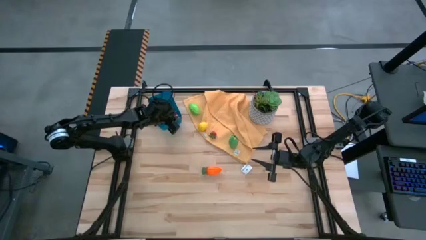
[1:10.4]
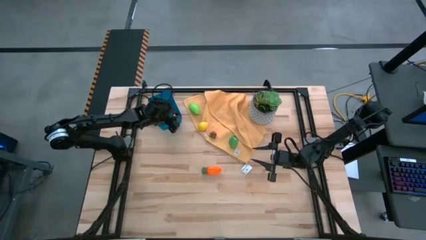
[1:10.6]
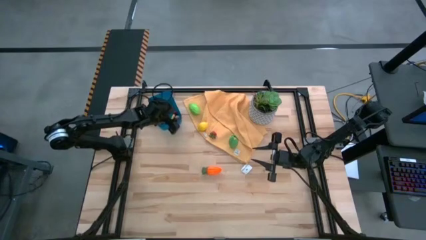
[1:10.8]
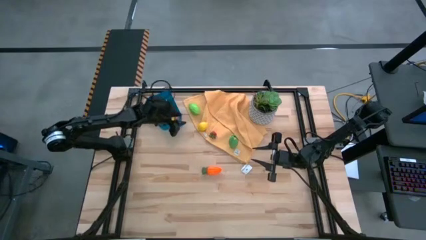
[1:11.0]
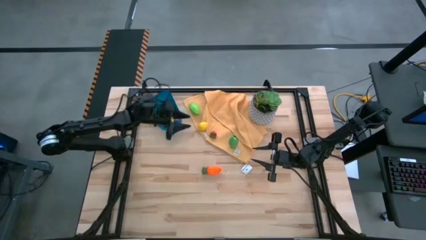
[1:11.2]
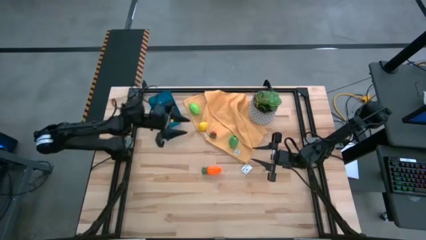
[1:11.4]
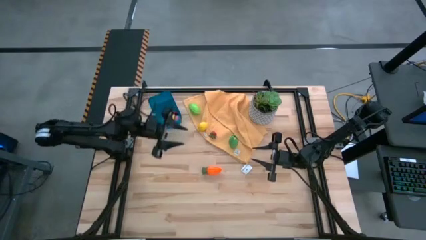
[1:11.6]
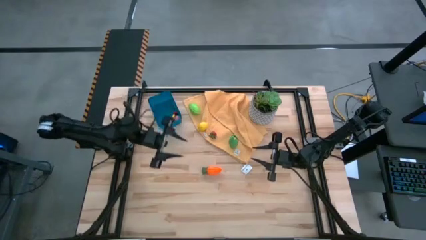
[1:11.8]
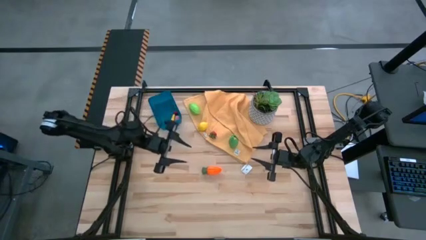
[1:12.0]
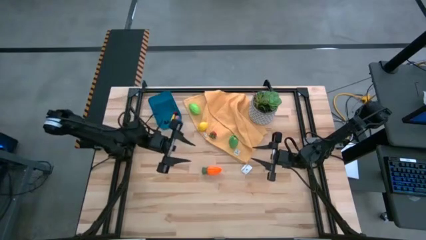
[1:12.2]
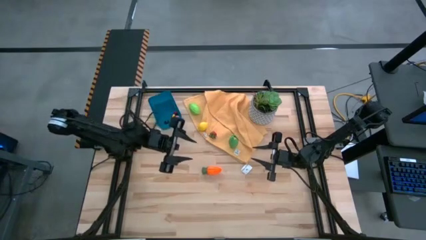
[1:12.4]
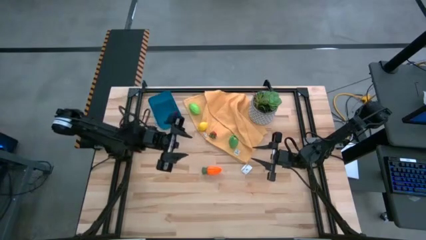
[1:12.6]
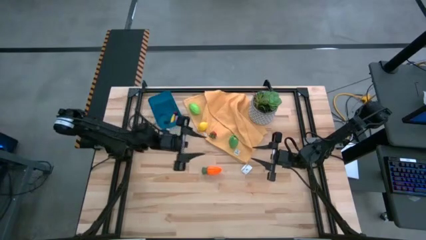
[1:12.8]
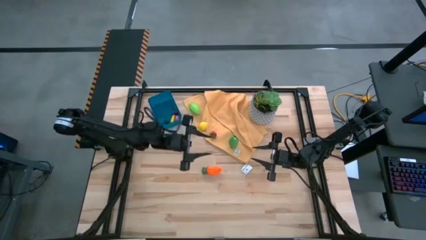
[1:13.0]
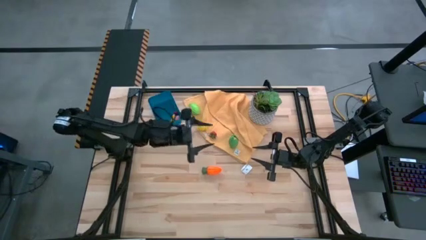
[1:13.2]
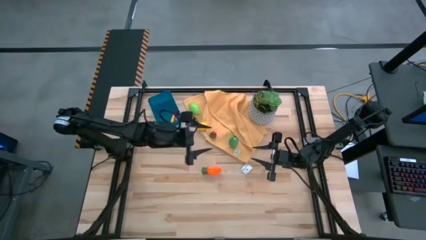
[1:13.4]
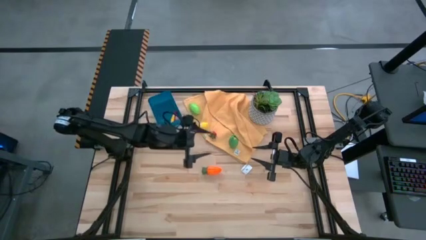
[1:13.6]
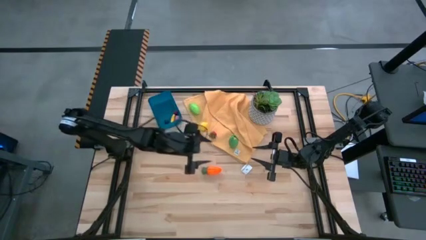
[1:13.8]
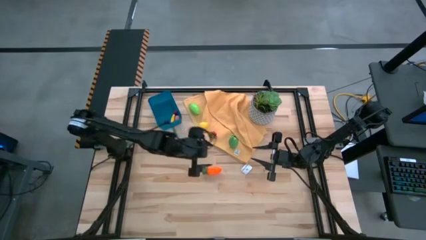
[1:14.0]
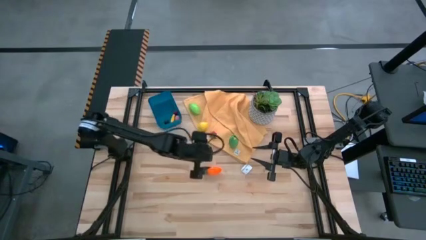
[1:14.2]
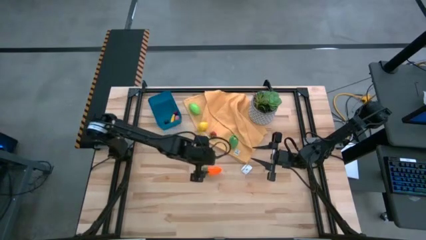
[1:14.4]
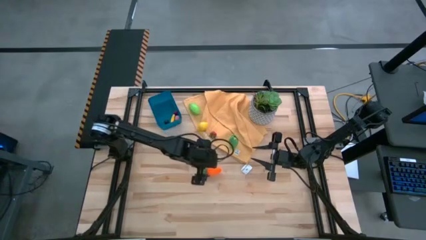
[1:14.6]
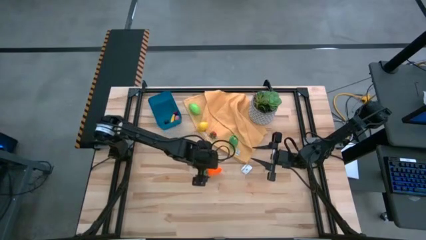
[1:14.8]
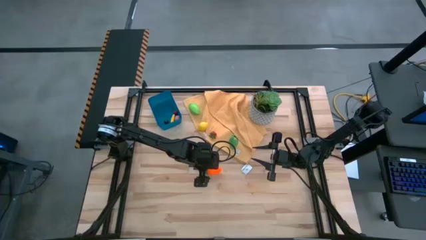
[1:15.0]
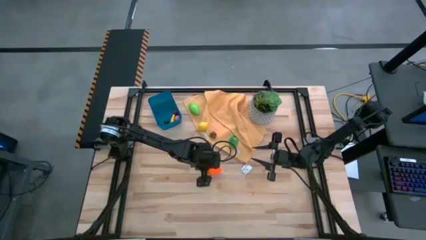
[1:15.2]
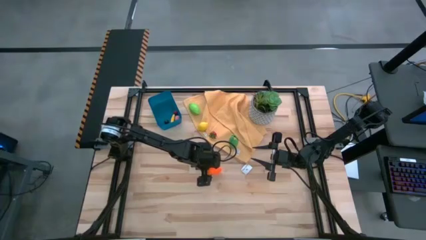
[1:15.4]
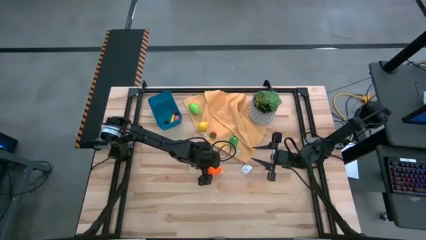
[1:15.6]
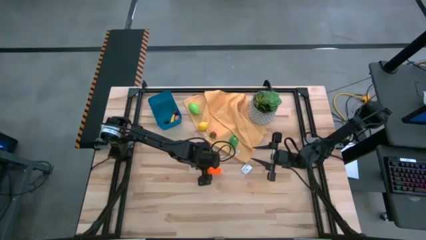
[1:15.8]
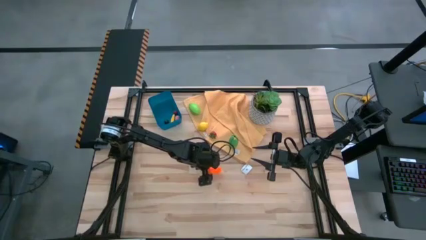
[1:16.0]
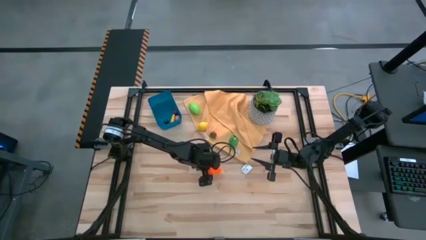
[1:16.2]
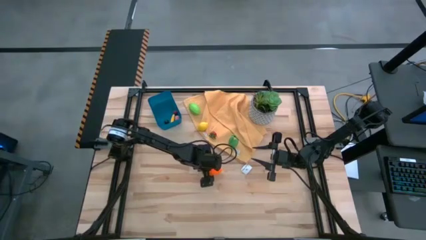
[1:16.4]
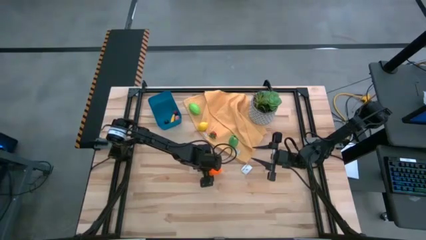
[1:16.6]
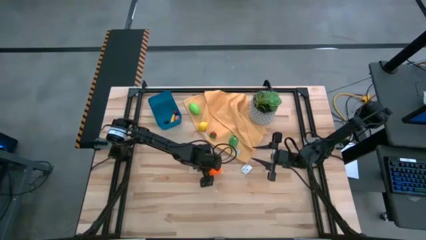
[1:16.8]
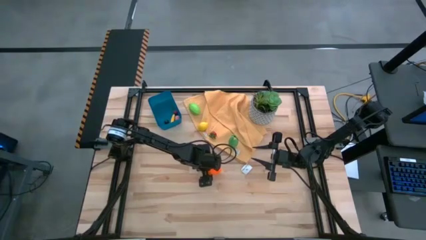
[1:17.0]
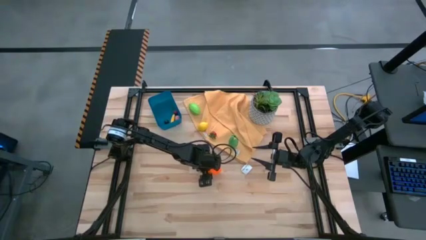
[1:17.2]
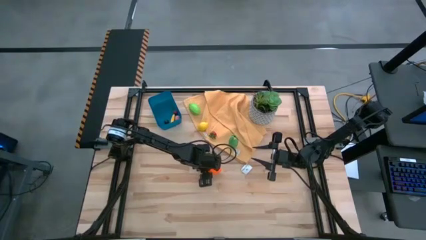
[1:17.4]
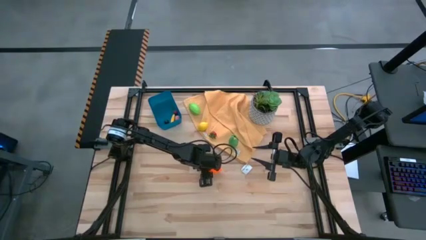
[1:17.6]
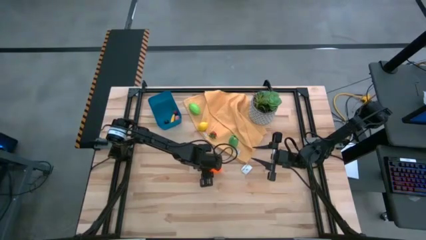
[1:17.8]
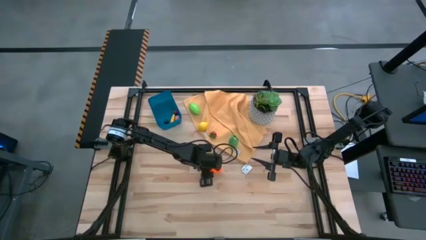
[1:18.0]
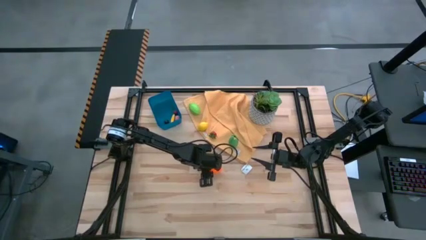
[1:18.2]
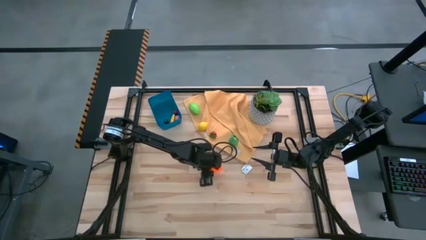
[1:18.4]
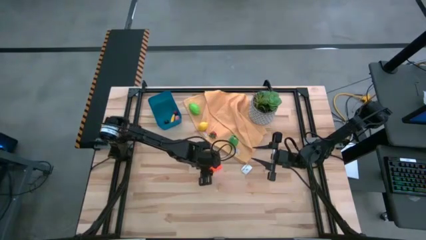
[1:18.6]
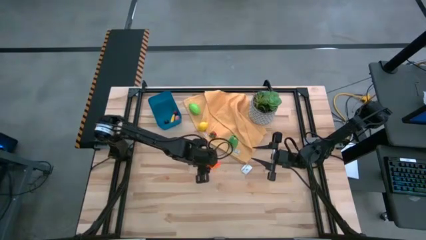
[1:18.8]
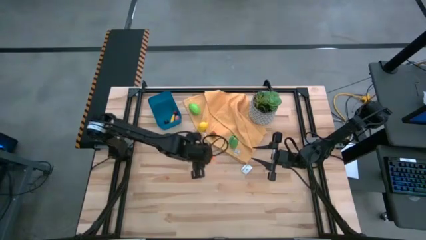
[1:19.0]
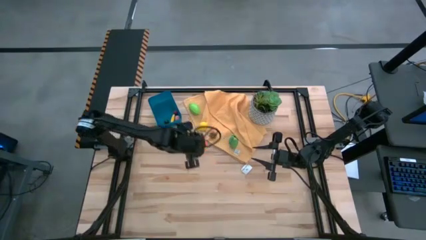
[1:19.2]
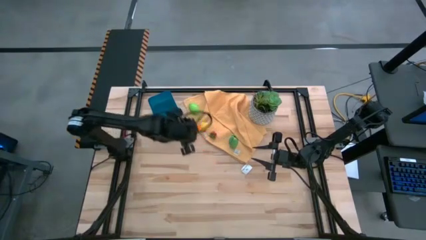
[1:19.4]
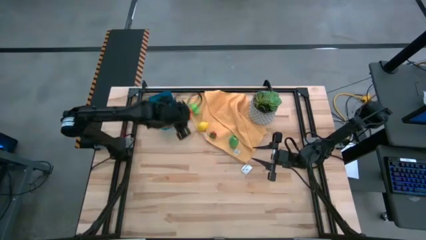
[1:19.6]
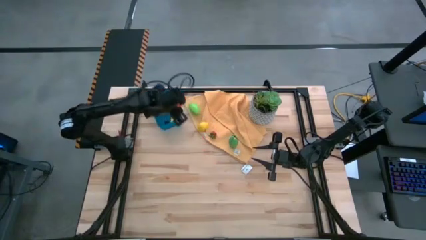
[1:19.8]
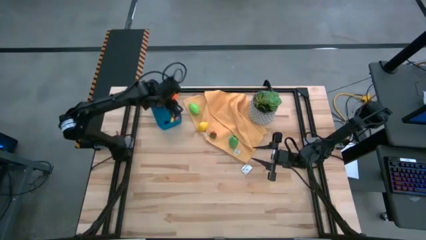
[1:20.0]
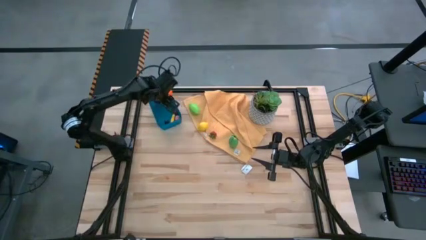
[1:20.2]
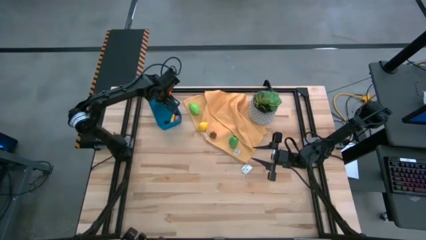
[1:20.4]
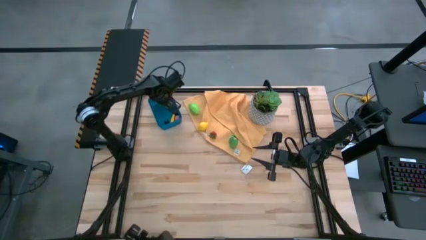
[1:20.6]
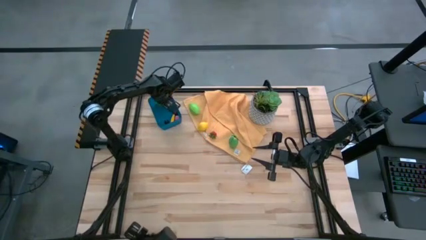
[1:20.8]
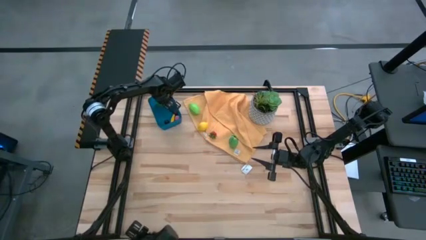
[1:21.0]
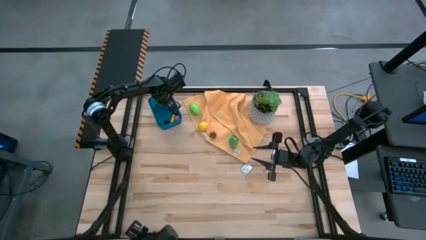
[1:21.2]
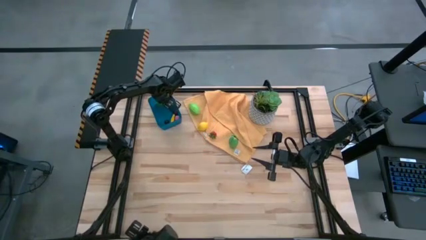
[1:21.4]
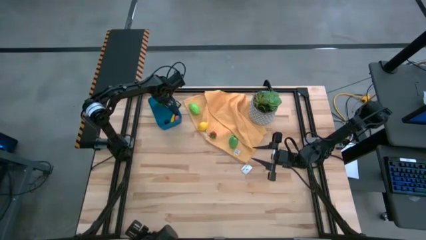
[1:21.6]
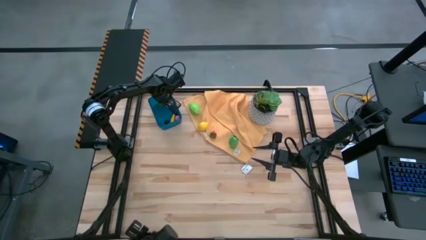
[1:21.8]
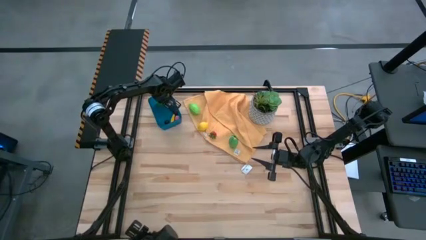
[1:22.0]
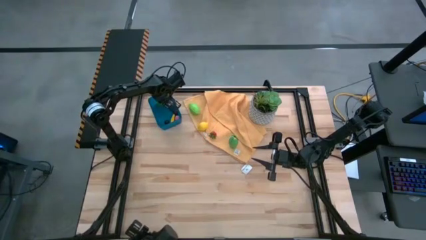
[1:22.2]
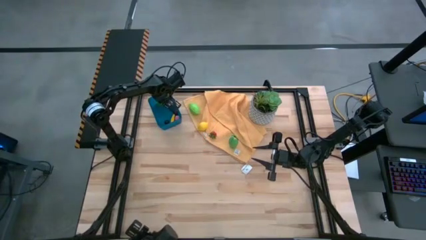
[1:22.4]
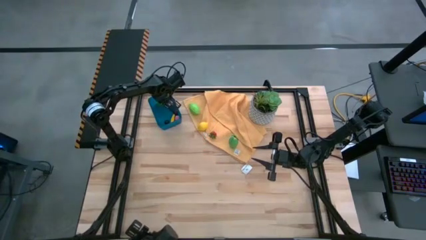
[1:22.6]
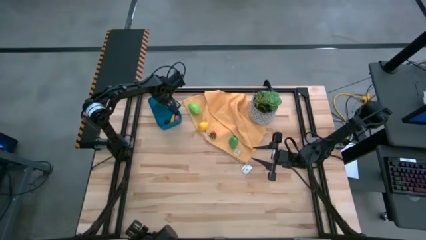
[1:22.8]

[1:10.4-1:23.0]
Task: Pick and placing Produce into tupperware
Put the carrot into the blue bin

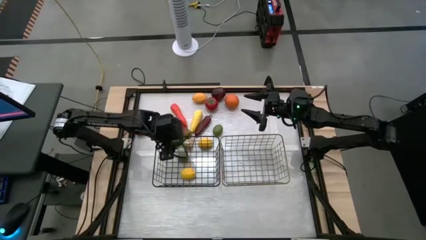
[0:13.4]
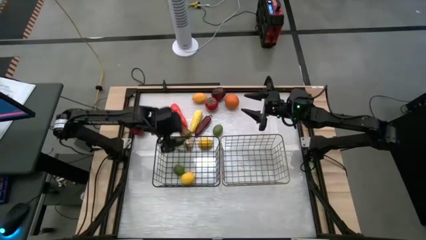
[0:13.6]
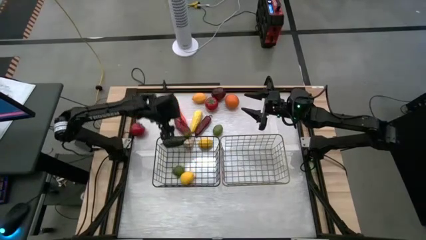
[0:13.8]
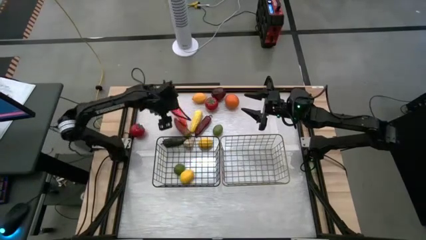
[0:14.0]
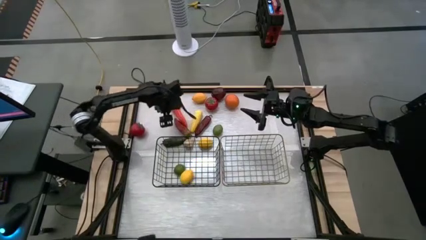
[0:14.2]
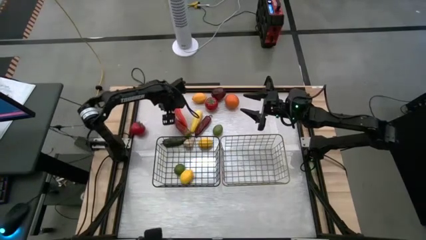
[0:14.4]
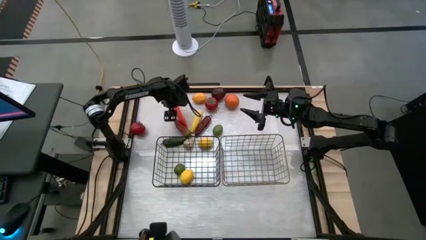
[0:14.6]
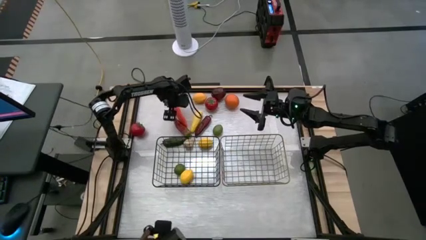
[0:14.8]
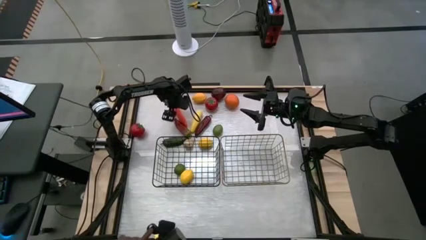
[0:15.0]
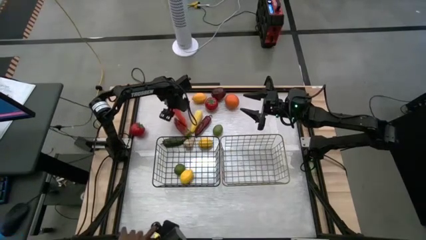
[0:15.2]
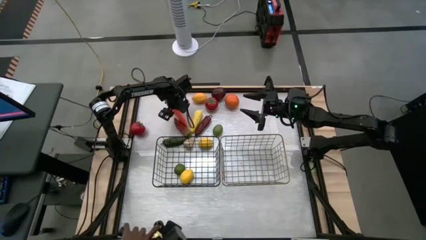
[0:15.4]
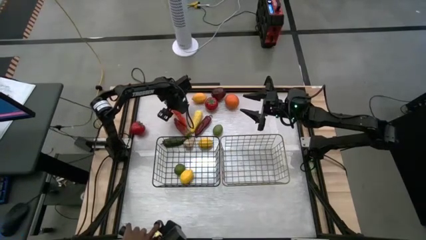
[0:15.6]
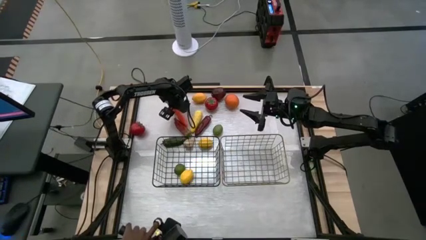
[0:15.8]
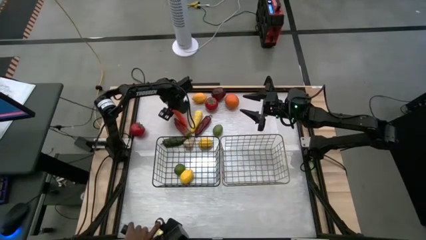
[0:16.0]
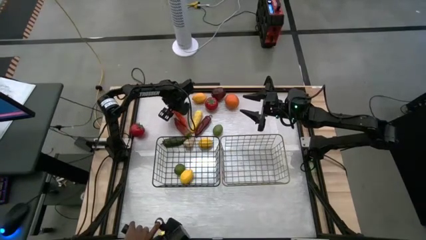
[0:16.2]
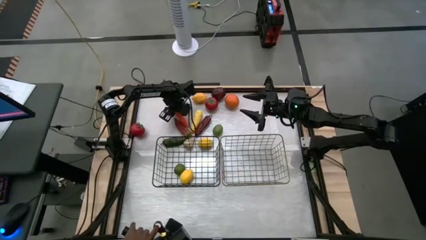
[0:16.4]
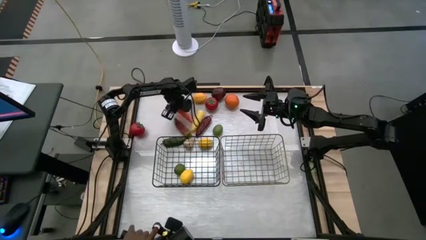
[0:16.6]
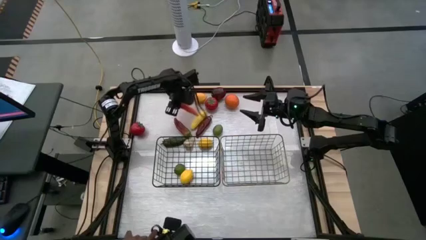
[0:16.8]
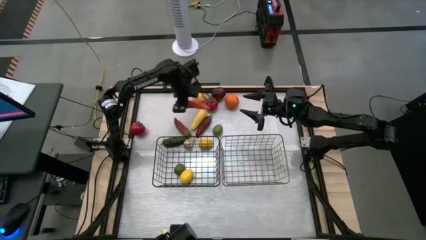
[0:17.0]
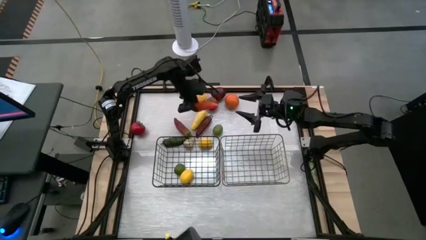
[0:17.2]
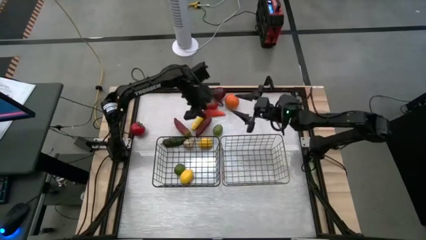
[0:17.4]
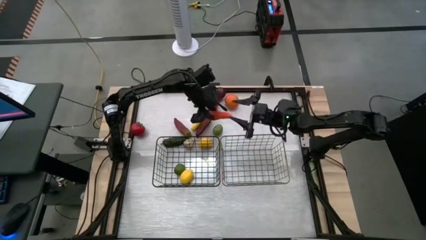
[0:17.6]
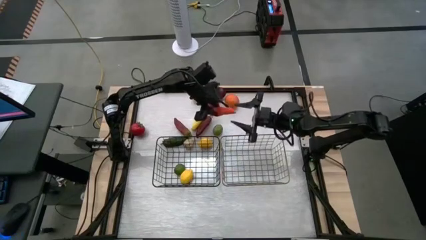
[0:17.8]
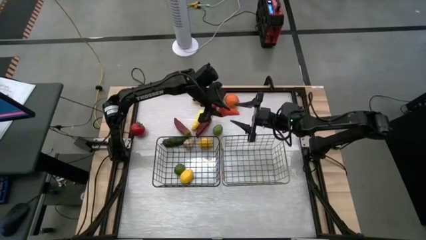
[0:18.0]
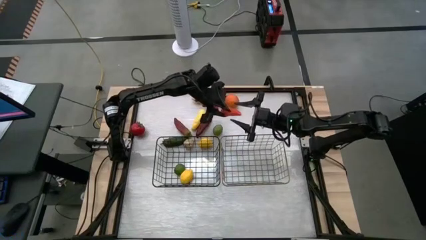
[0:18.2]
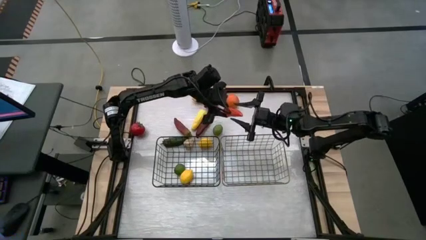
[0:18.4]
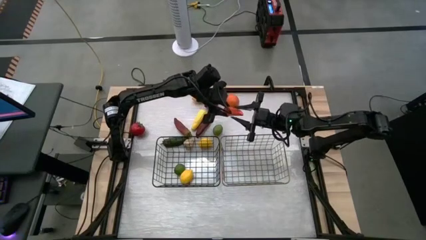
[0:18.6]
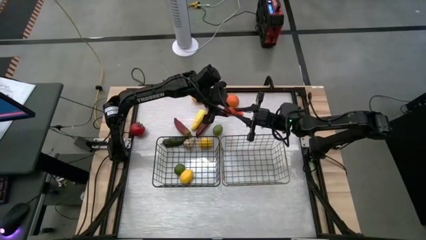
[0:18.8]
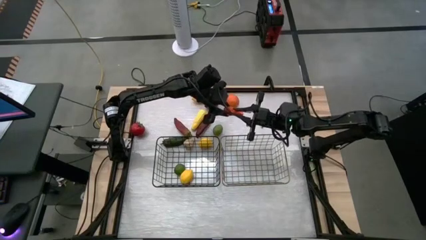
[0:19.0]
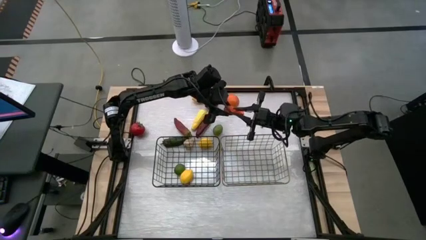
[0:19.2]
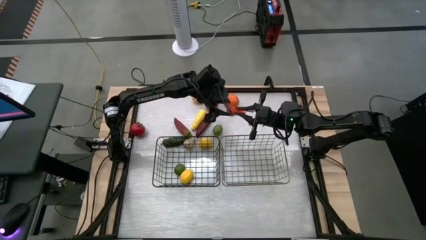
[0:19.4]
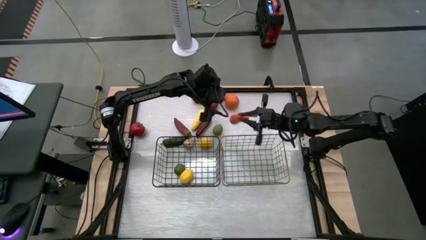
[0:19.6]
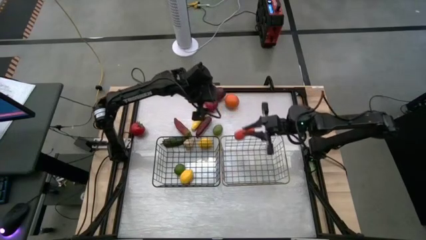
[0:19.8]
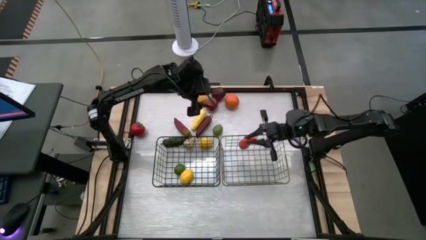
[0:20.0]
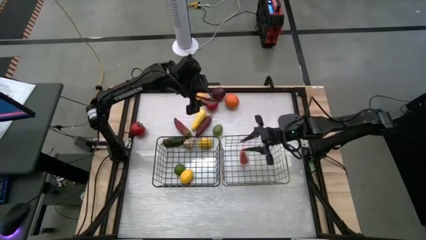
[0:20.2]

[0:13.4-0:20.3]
Task: Sort produce into baskets
Put the orange carrot into the gold wire basket
